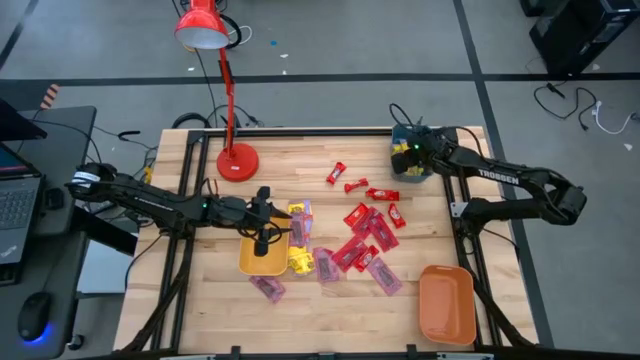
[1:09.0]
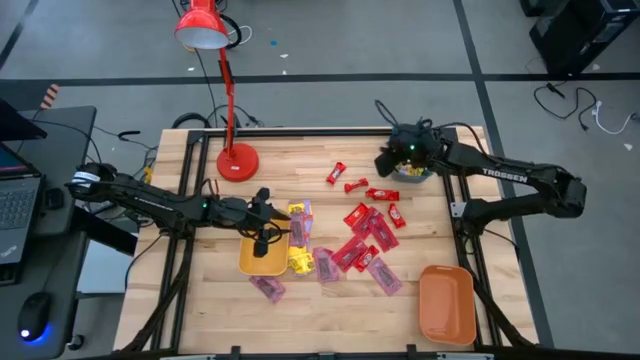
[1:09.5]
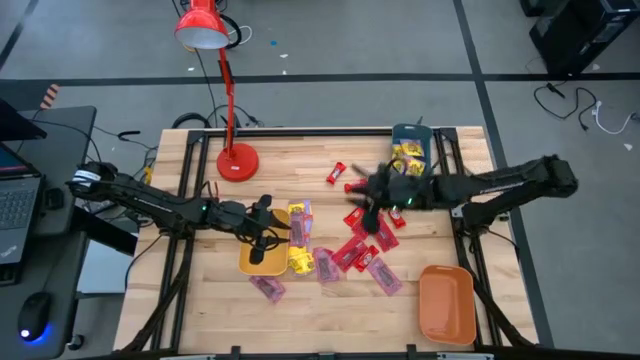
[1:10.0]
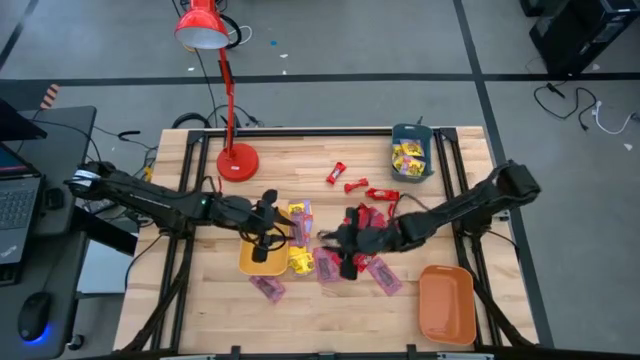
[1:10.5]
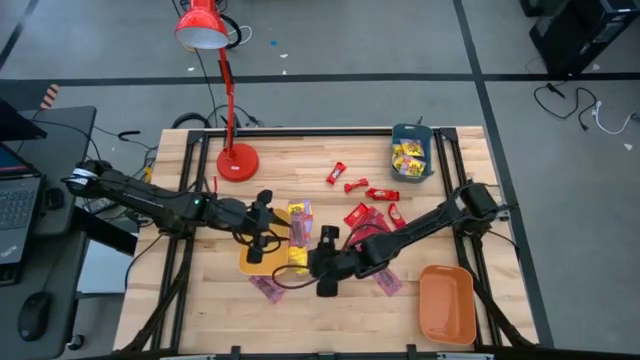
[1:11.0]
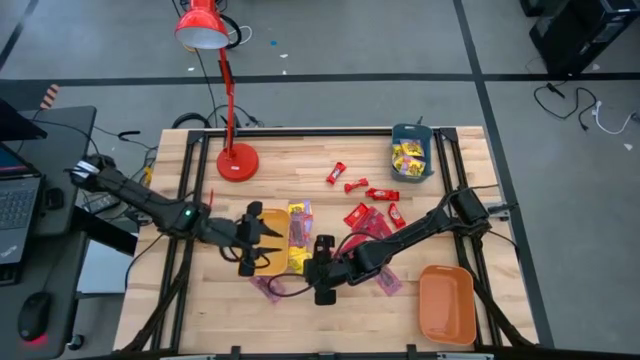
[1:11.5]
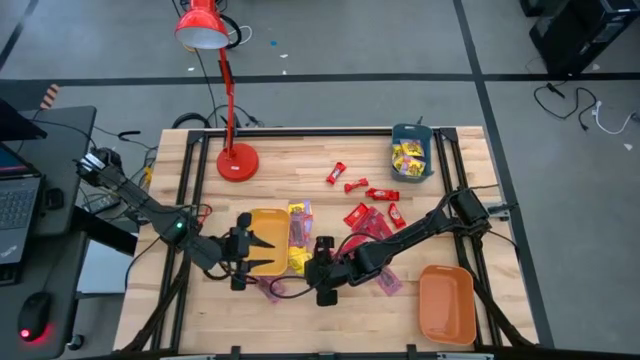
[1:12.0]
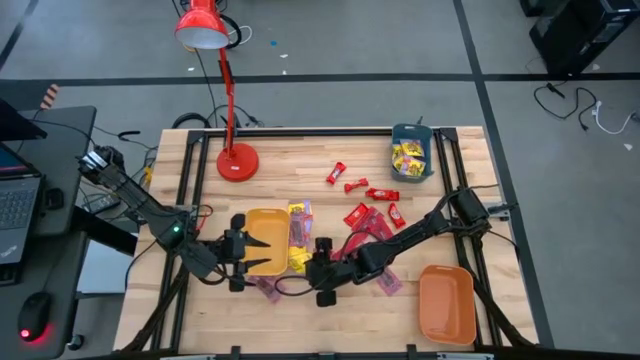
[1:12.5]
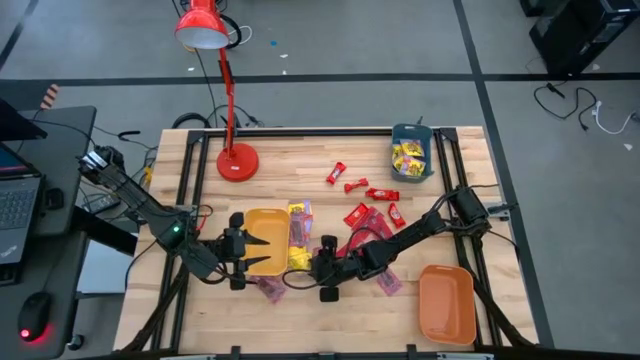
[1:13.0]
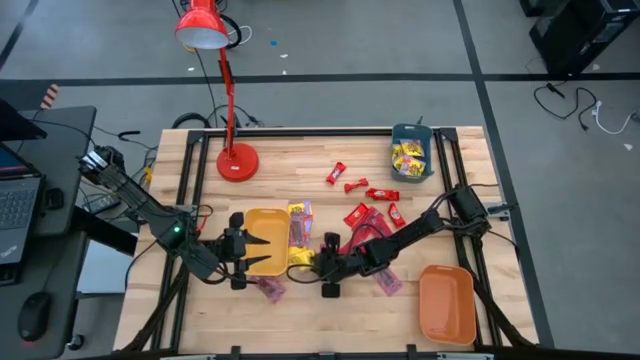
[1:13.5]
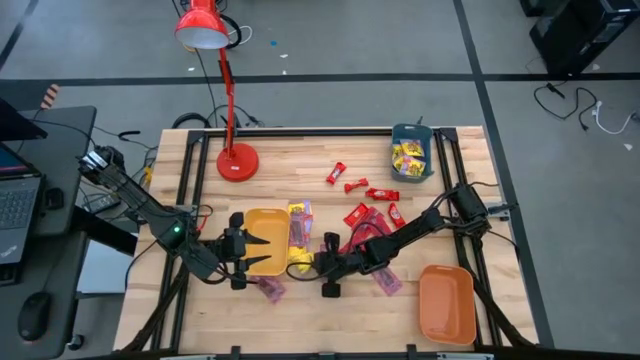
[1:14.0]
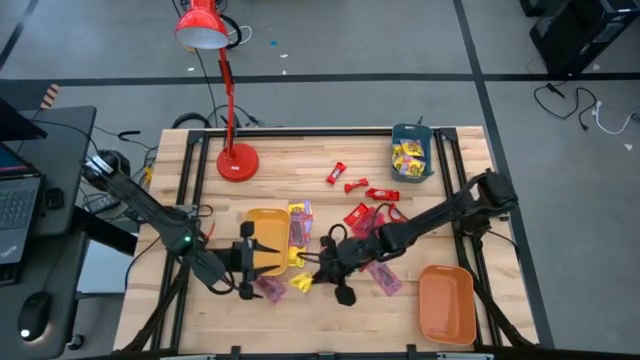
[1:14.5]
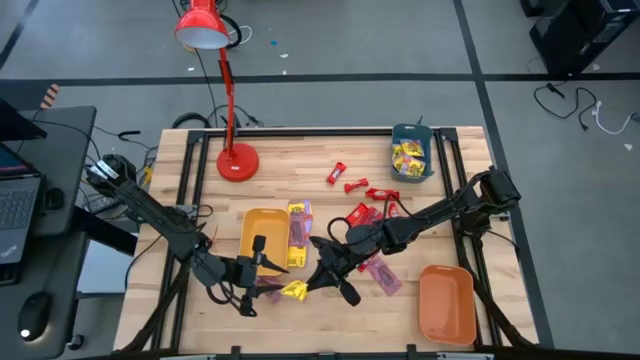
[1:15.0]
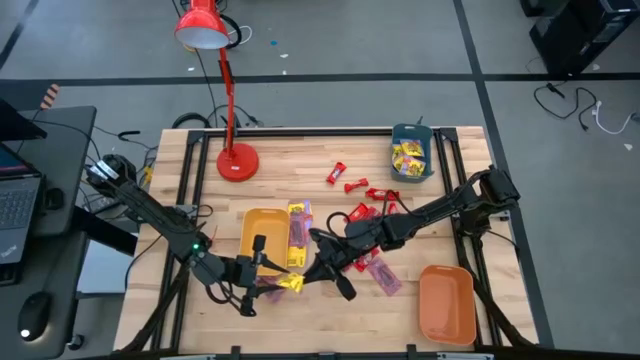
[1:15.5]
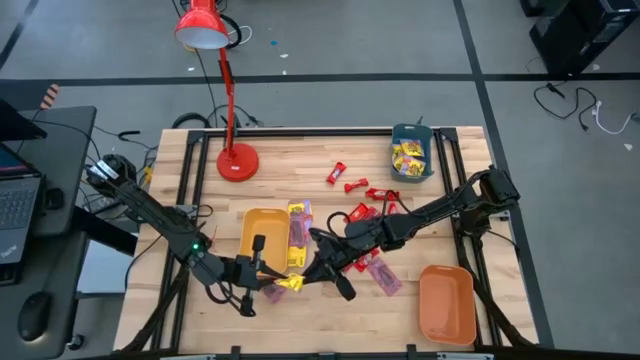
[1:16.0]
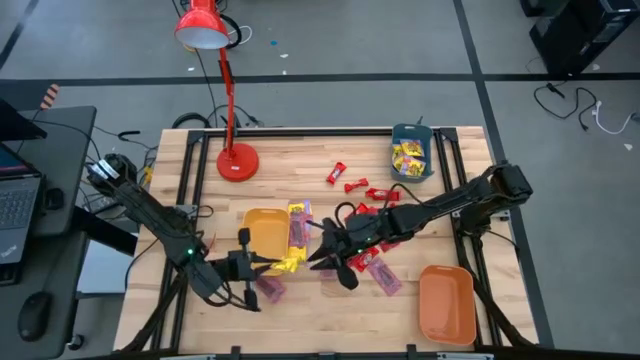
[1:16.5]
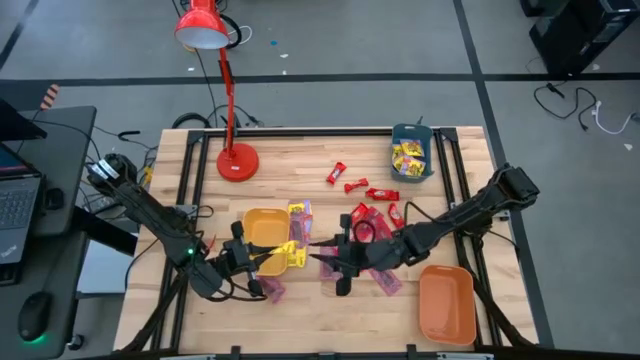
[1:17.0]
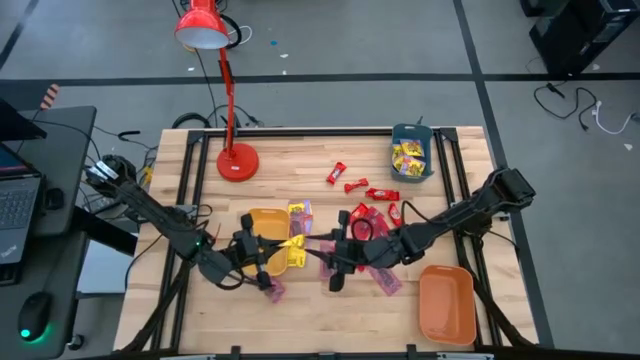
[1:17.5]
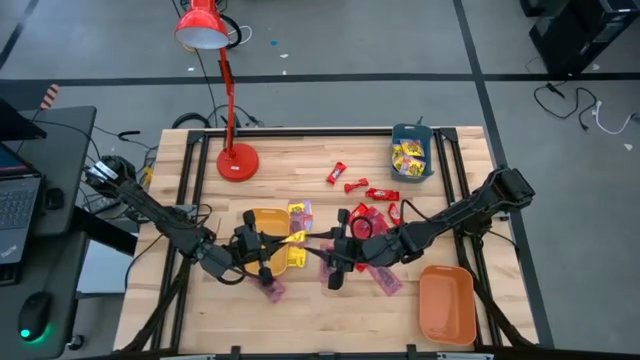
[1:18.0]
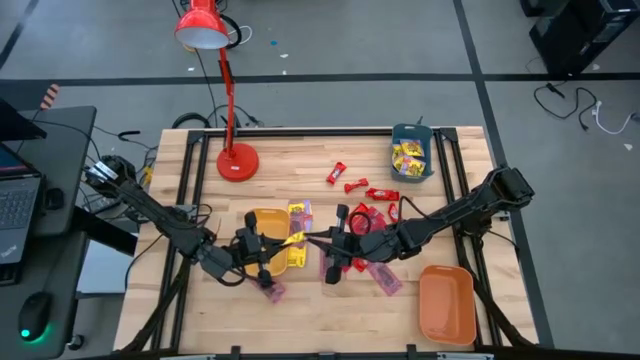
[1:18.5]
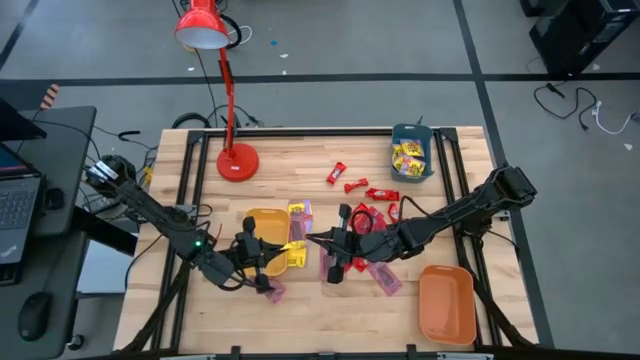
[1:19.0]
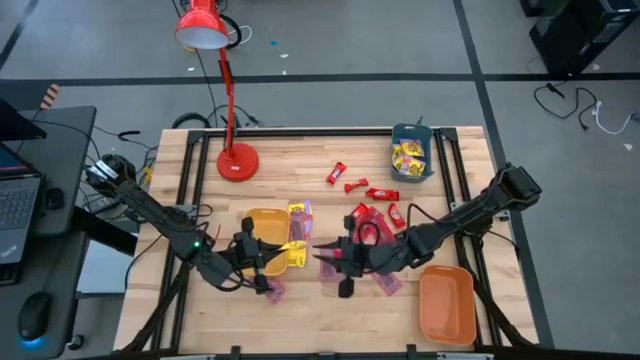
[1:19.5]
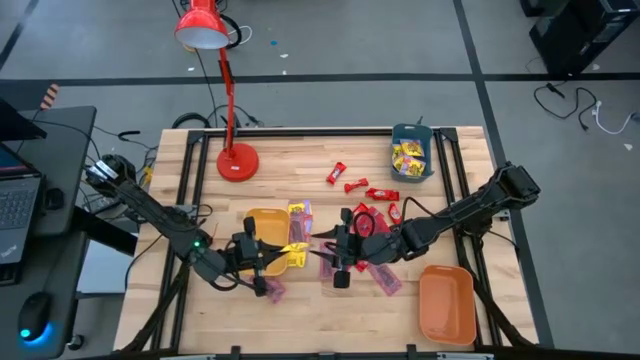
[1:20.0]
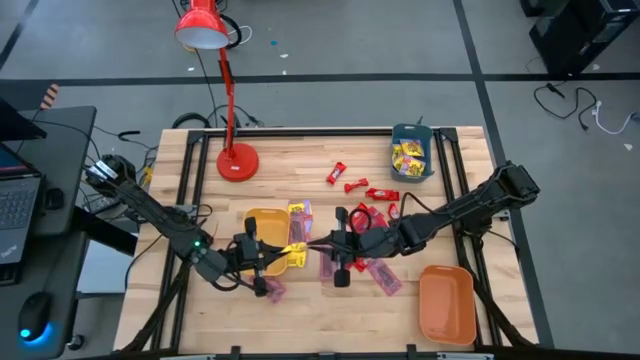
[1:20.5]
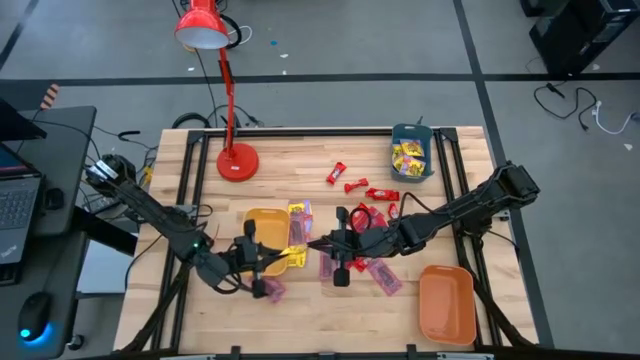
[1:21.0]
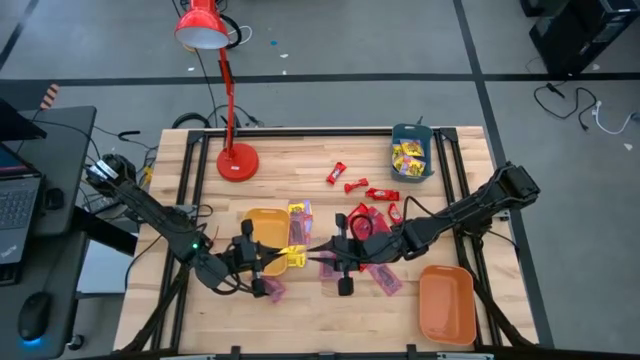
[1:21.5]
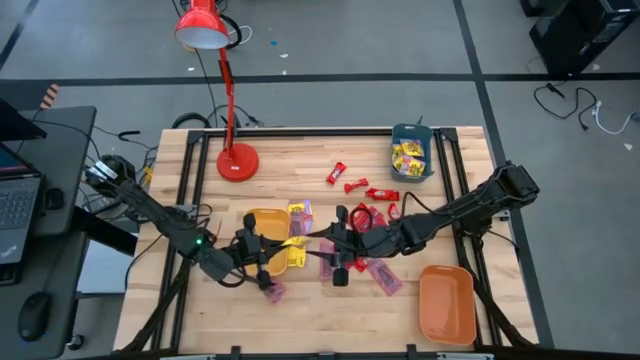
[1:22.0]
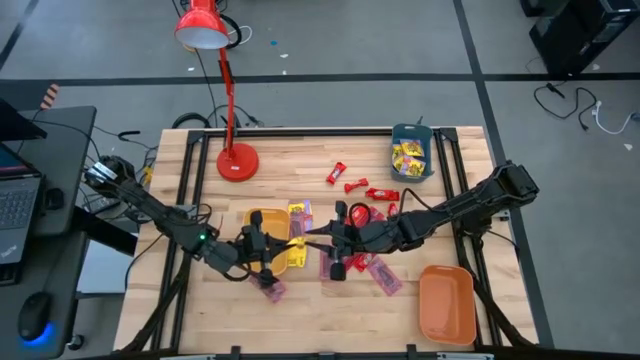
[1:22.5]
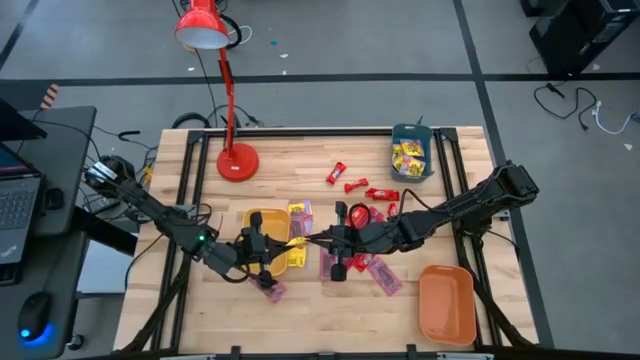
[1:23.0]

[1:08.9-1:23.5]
Task: Sort candy
Put the yellow candy pack into the blue bin

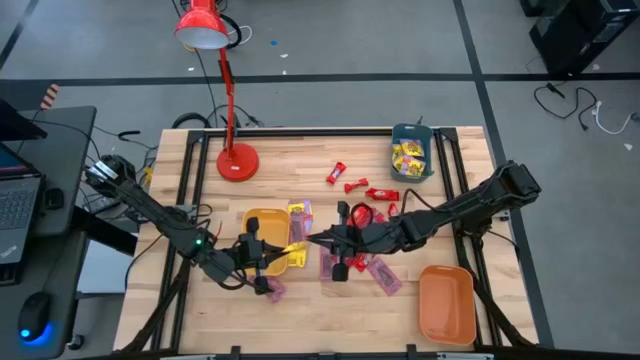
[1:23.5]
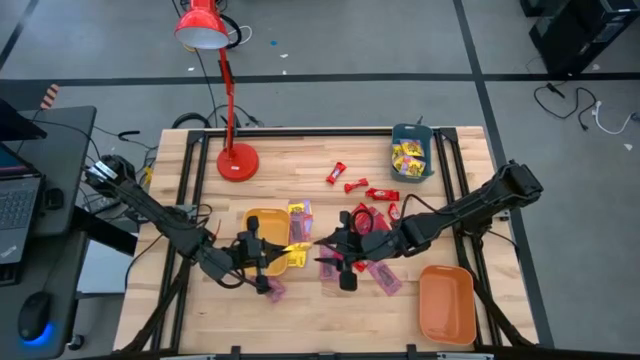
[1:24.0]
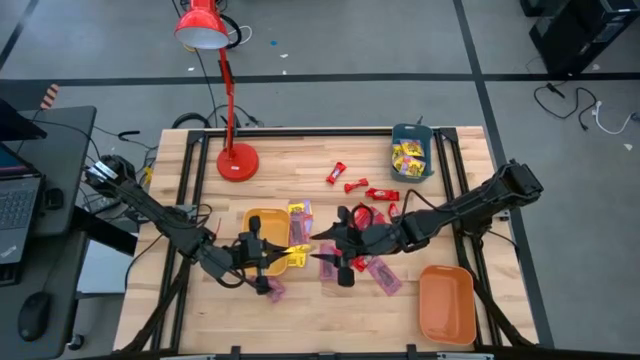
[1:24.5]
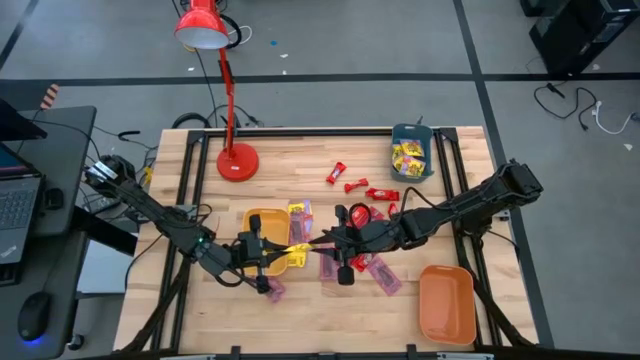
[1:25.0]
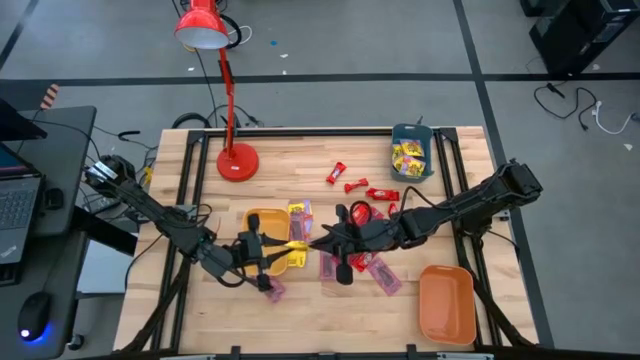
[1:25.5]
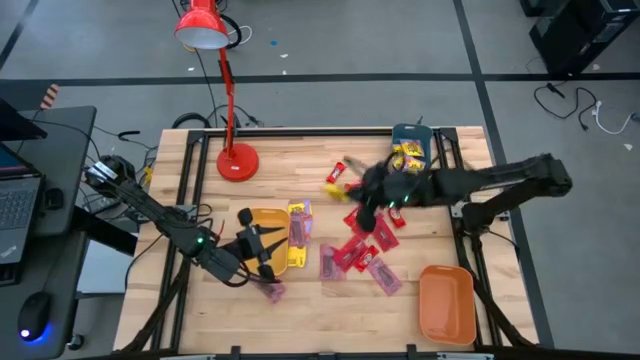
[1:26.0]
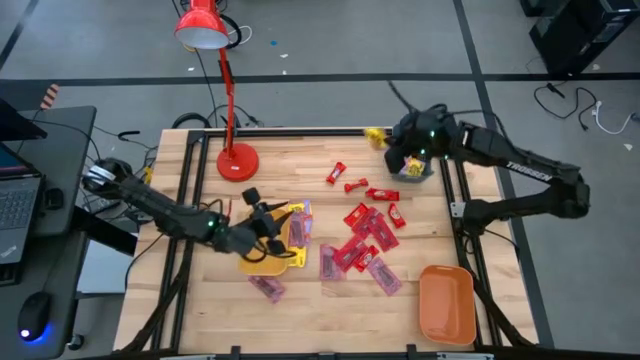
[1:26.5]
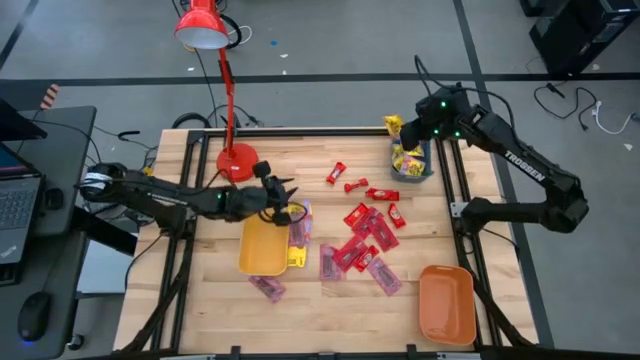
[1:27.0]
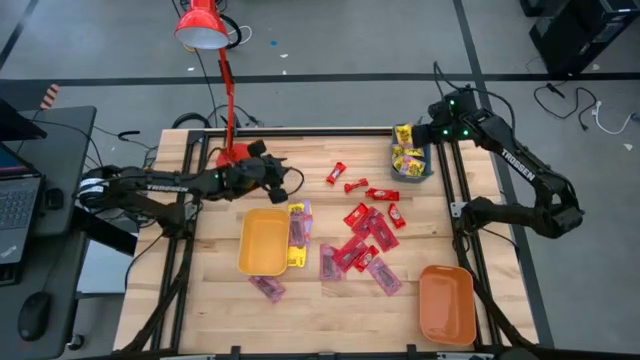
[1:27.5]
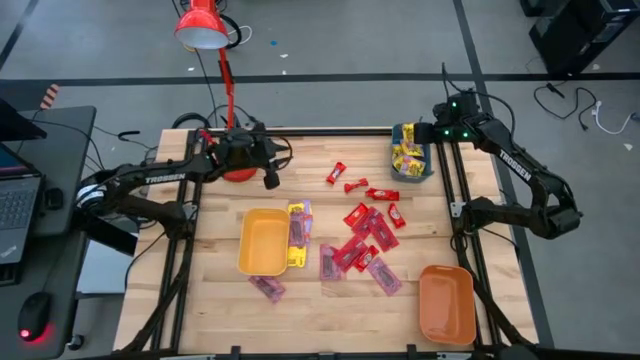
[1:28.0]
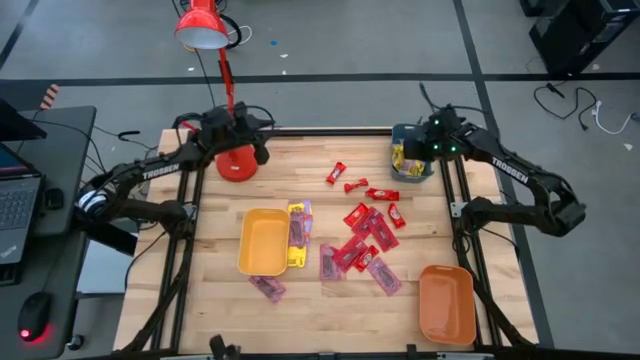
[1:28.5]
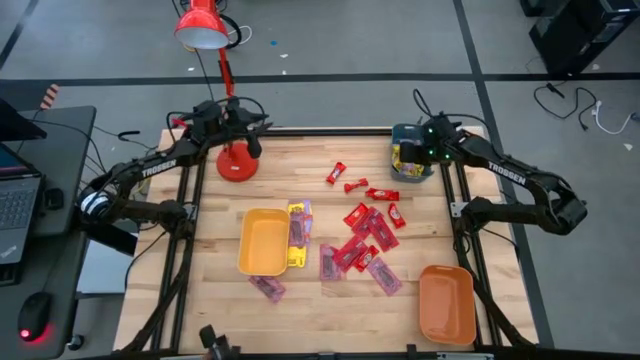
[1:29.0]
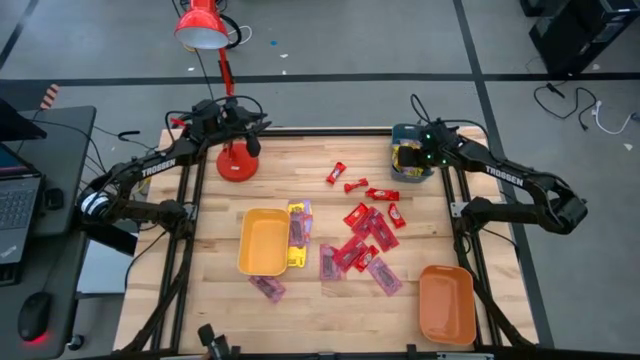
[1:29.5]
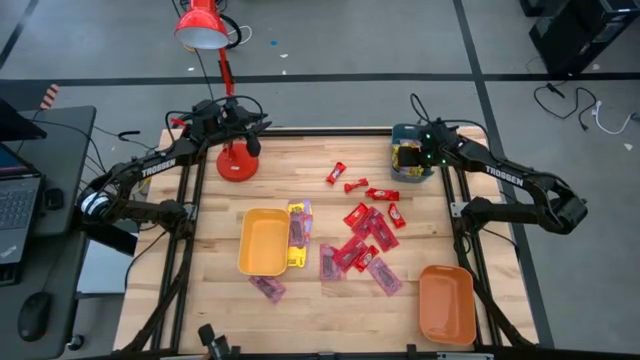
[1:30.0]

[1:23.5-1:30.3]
Put the yellow candy pack into the blue bin
